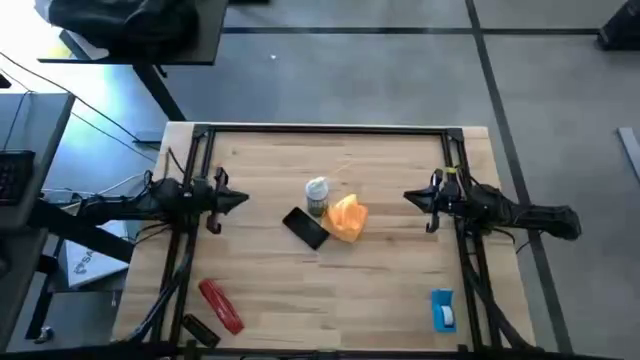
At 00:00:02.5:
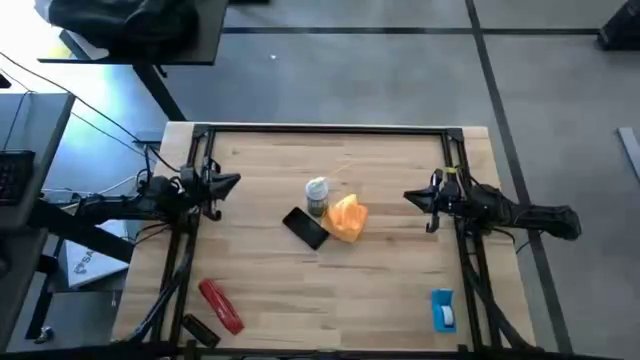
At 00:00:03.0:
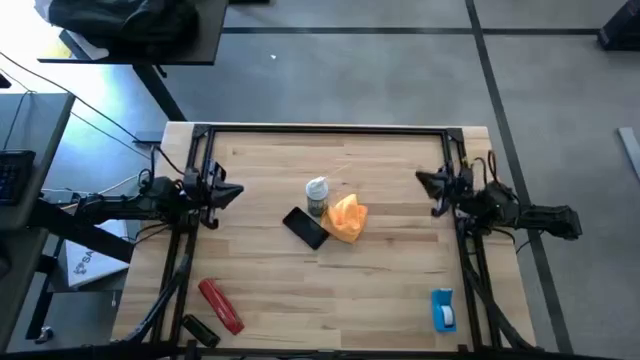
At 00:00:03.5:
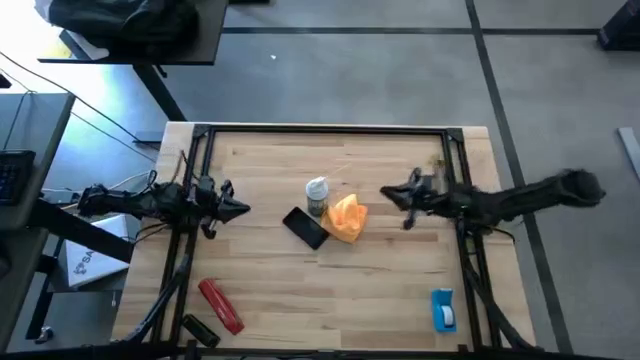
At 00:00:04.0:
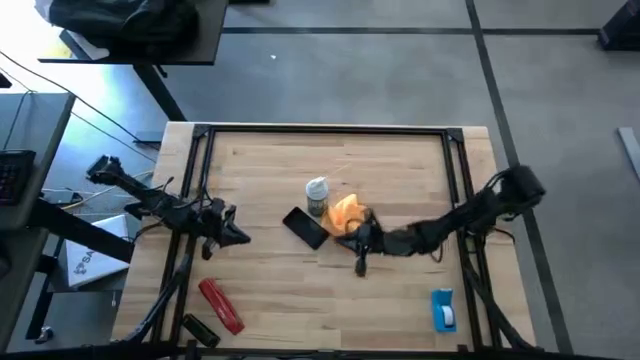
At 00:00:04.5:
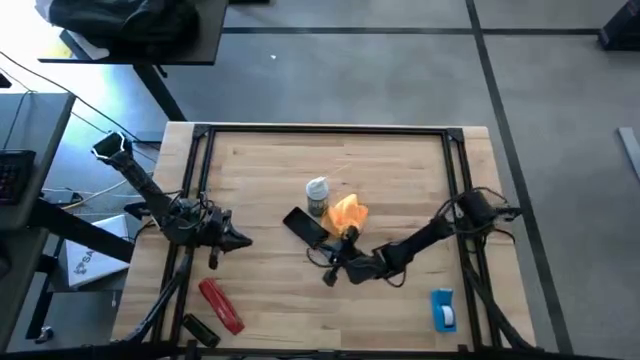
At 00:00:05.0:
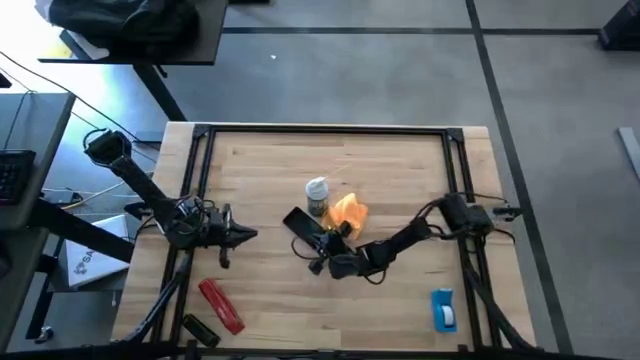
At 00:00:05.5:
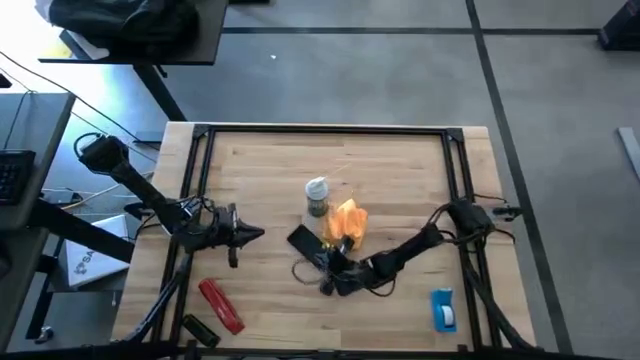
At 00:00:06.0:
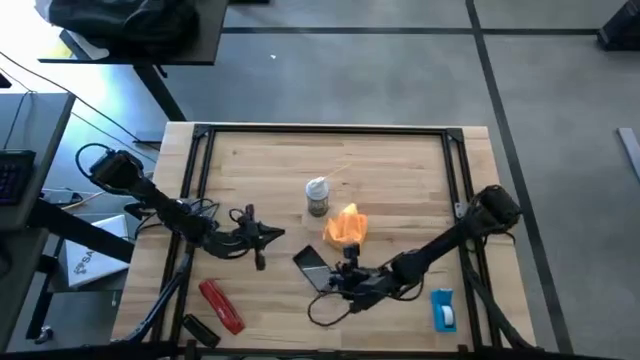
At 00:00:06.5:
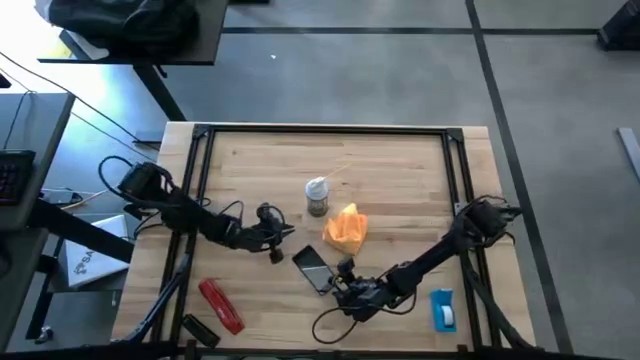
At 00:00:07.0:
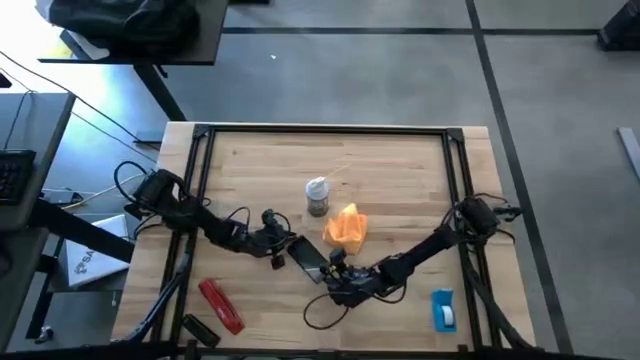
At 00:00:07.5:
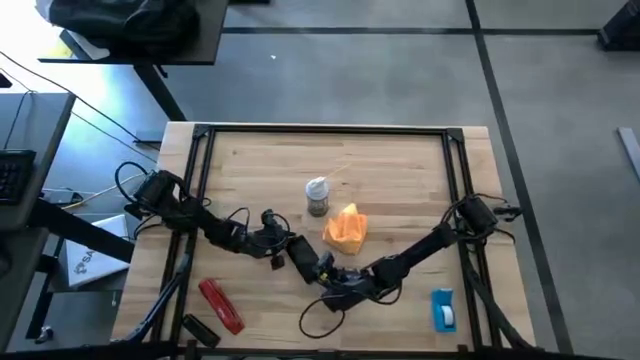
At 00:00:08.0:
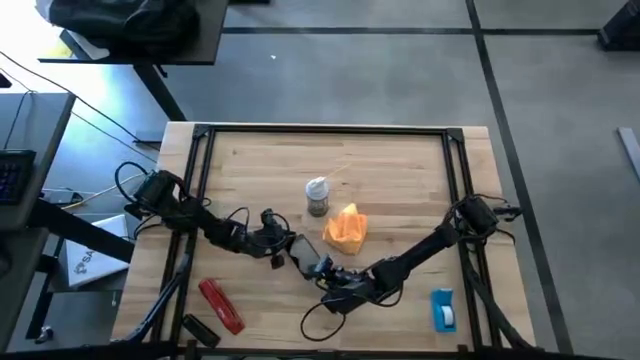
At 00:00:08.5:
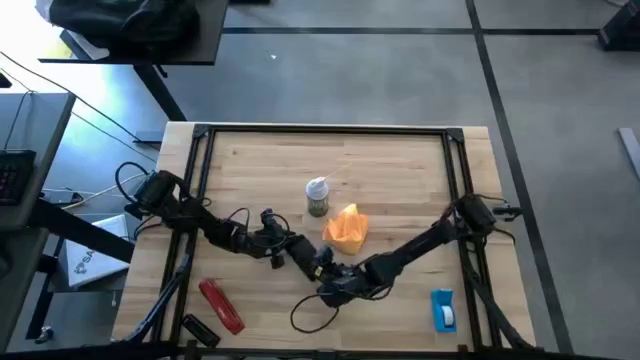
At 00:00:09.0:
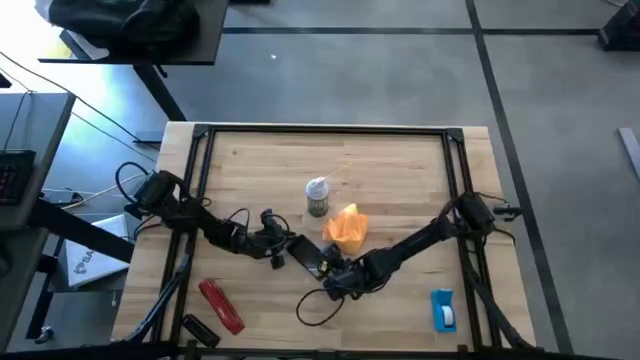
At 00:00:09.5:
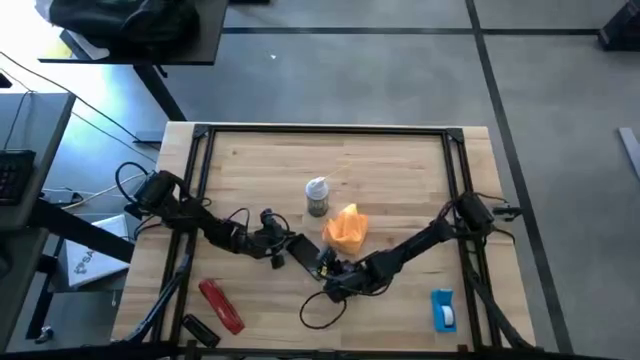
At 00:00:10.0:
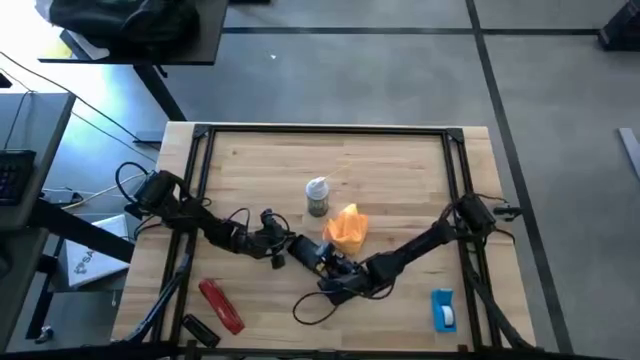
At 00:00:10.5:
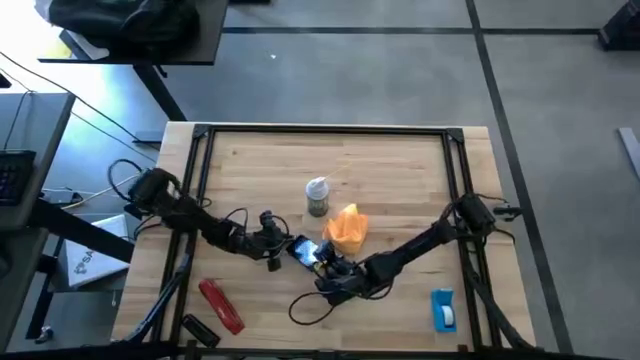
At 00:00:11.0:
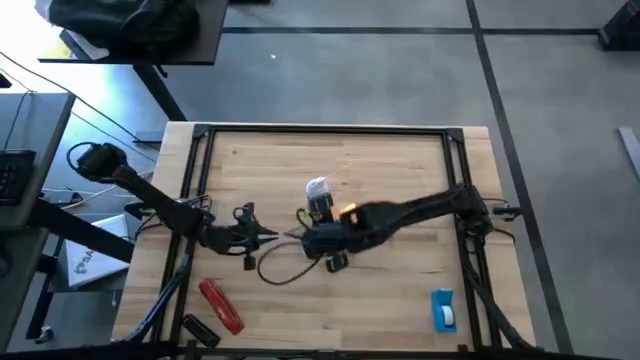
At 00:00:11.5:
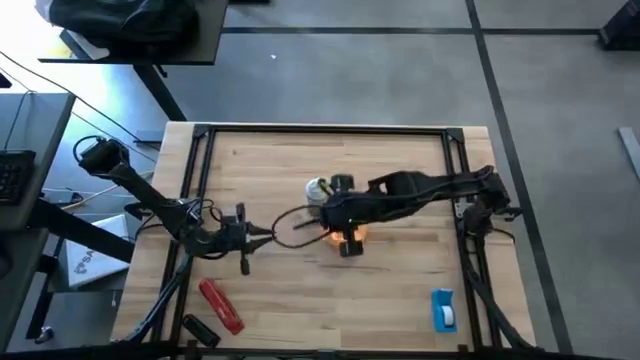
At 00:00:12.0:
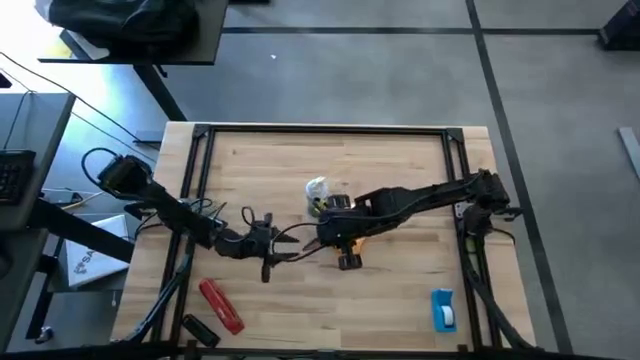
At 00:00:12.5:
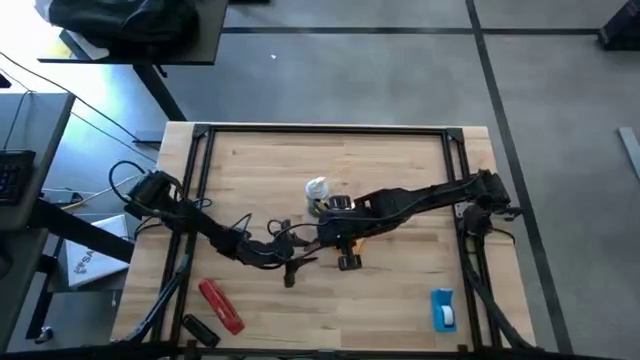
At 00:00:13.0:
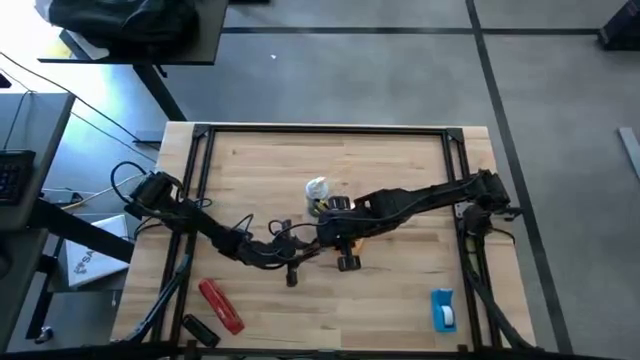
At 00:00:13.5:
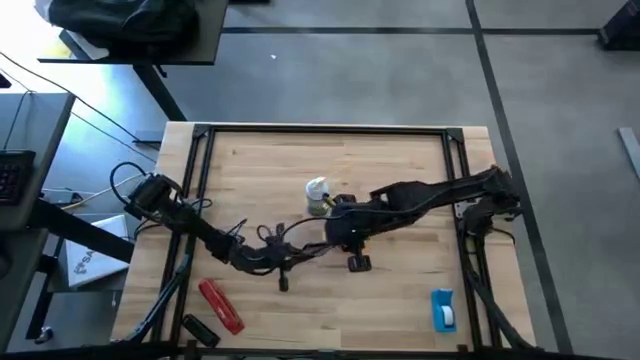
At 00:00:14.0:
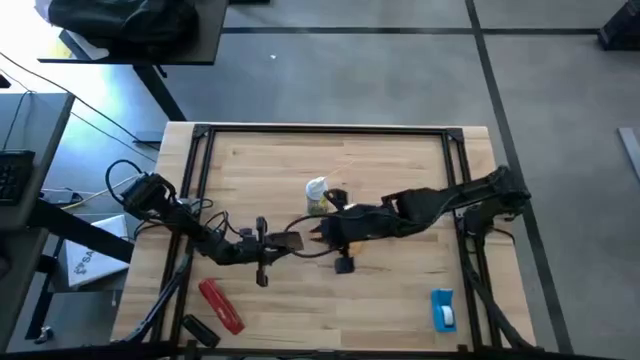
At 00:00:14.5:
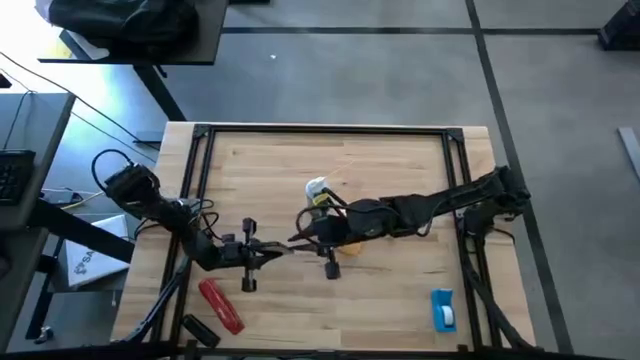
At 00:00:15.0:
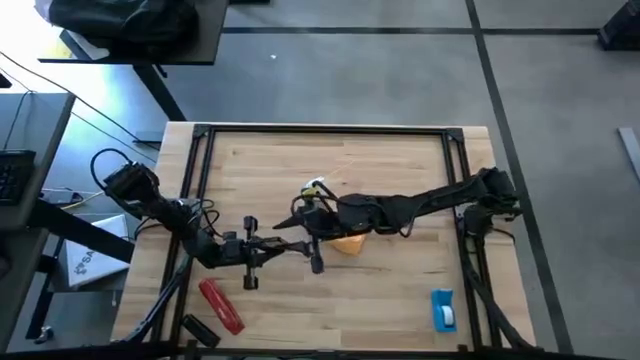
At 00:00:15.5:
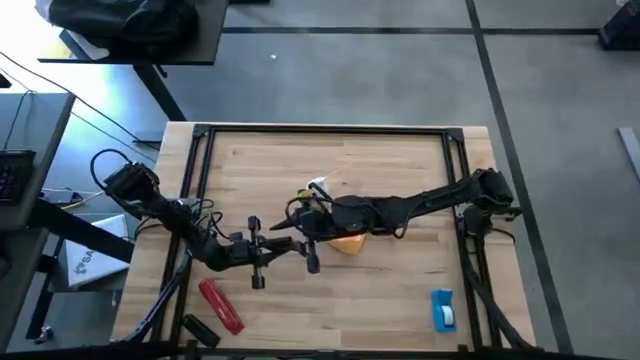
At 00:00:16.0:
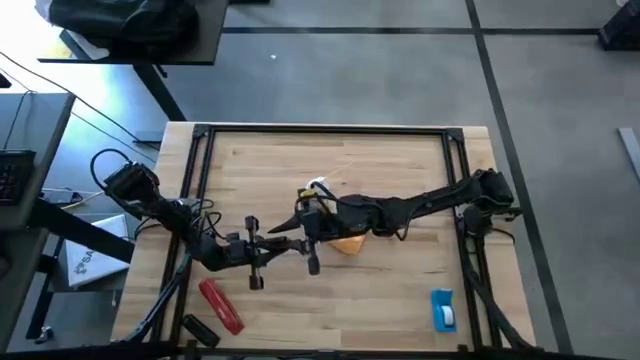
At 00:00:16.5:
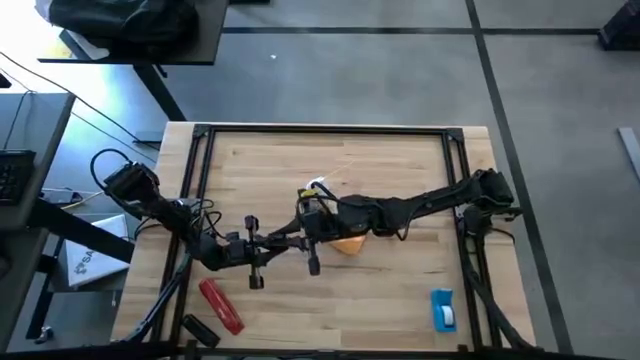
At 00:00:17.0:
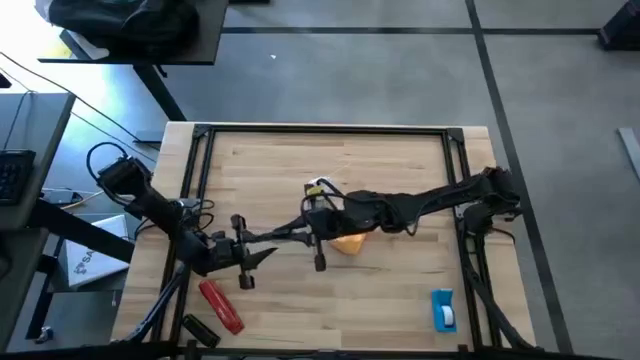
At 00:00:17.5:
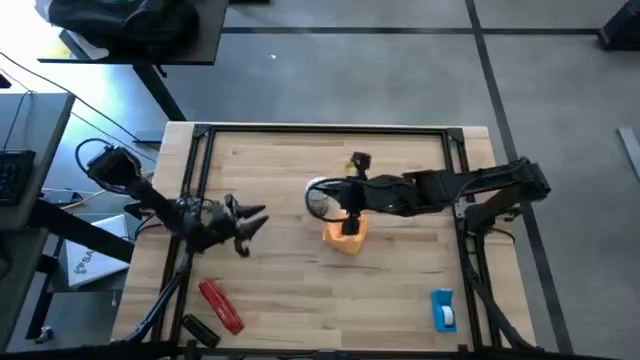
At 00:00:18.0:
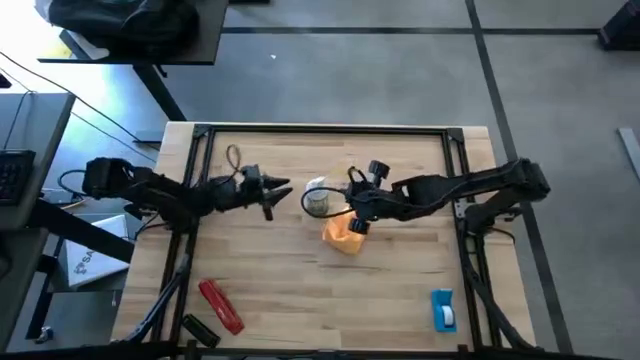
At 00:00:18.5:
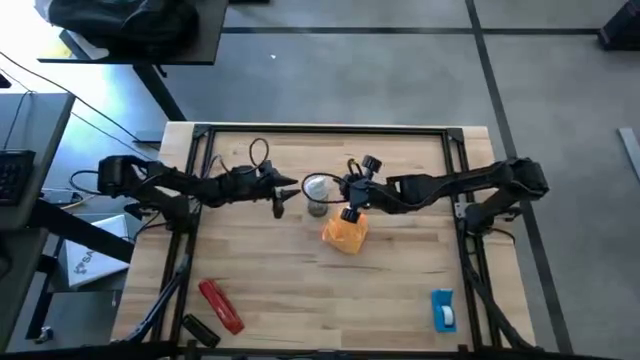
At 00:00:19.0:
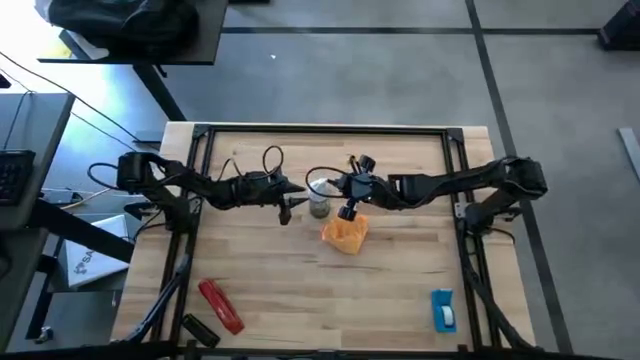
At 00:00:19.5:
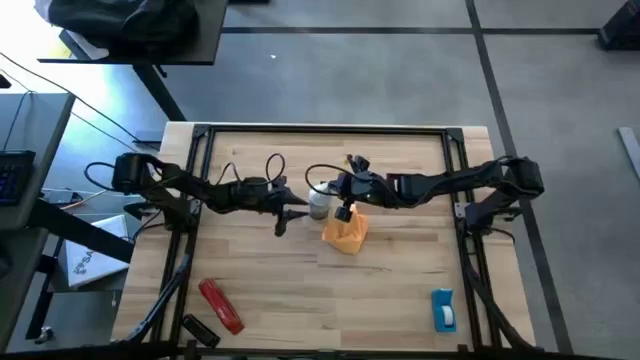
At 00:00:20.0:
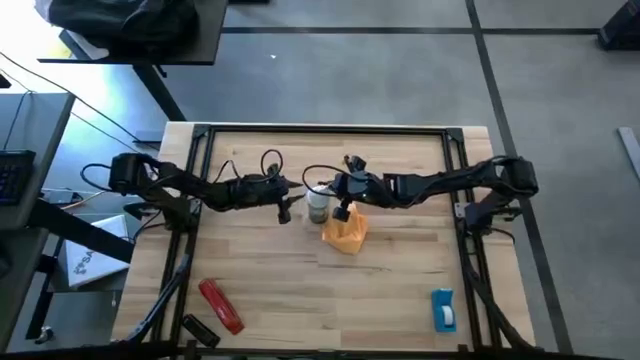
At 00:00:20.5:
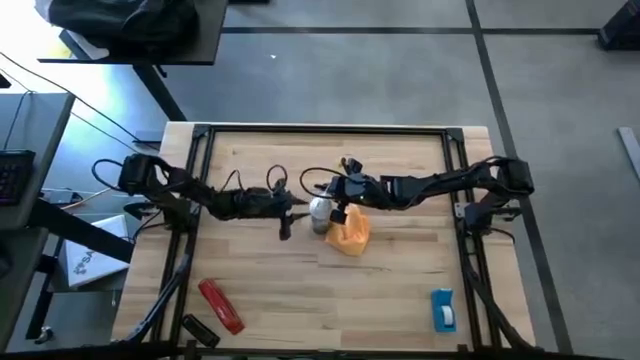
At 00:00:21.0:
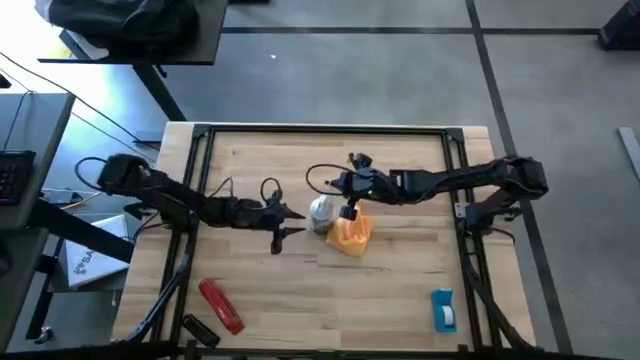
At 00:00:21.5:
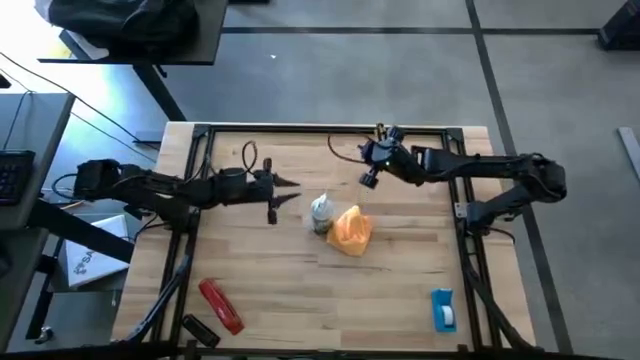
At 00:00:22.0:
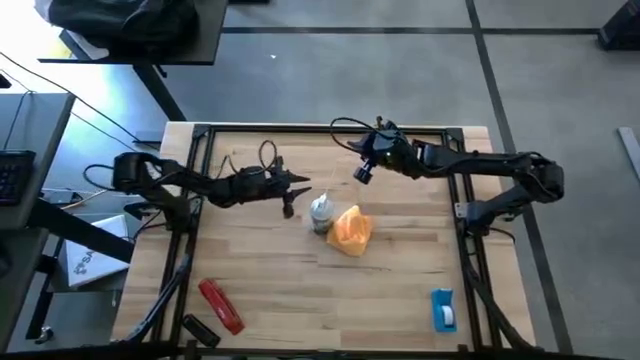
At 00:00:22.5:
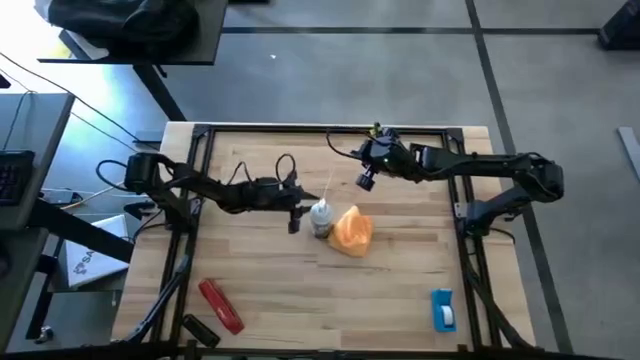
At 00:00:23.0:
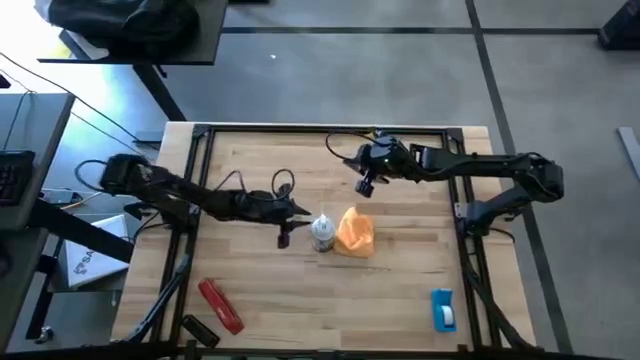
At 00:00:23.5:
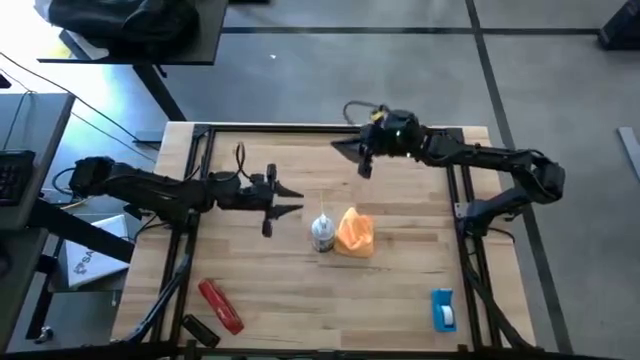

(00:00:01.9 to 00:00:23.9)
Task: Apply microfiber cloth
Spray the front and back of the black cellphone using the white spray bottle
